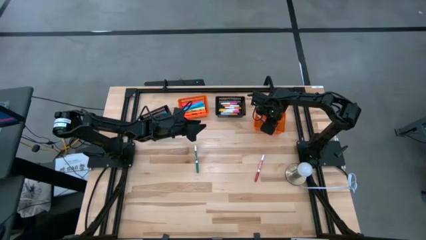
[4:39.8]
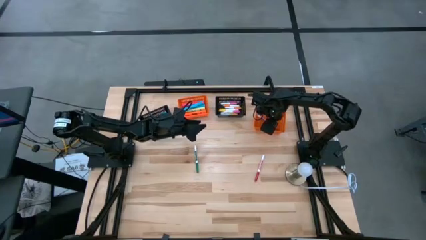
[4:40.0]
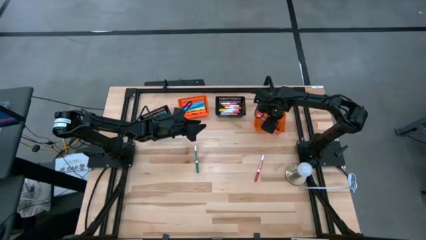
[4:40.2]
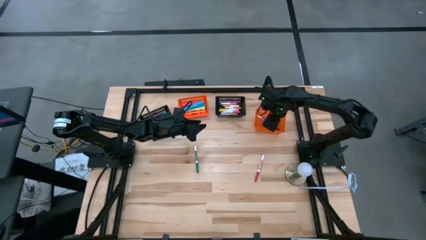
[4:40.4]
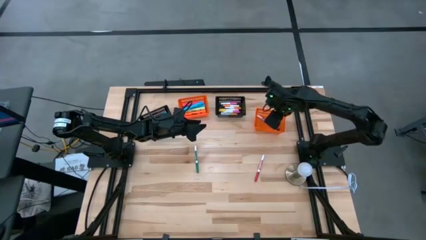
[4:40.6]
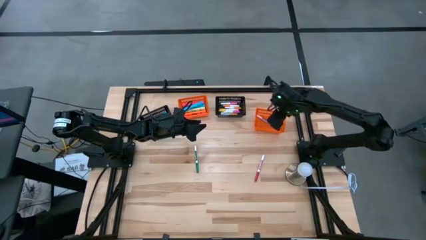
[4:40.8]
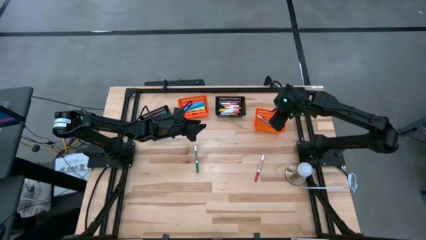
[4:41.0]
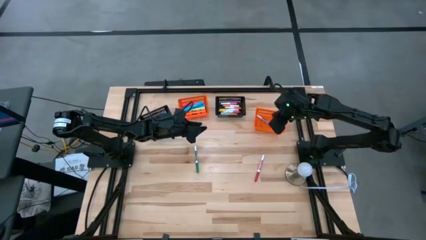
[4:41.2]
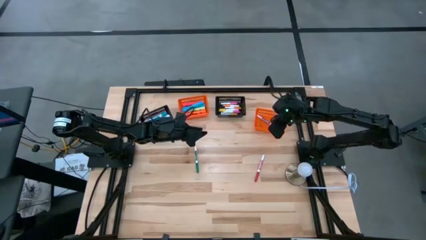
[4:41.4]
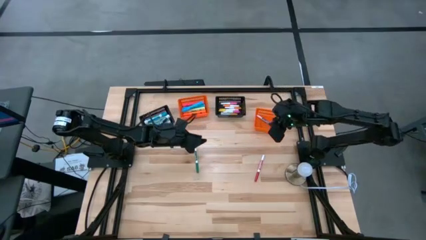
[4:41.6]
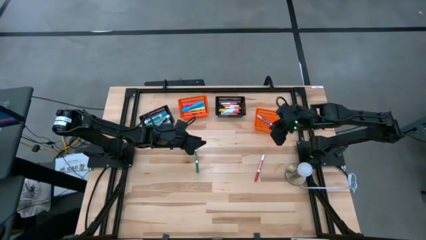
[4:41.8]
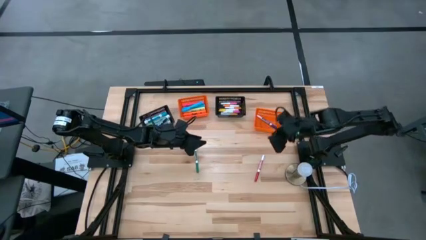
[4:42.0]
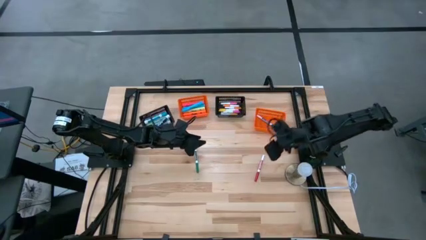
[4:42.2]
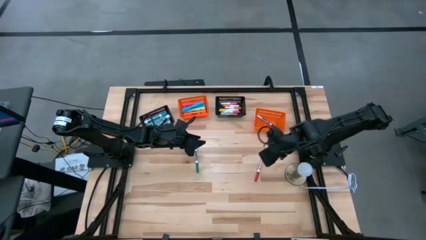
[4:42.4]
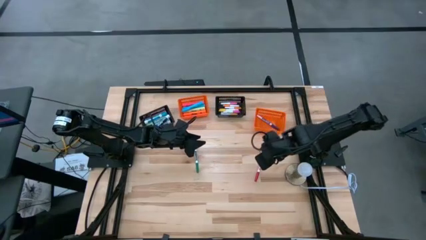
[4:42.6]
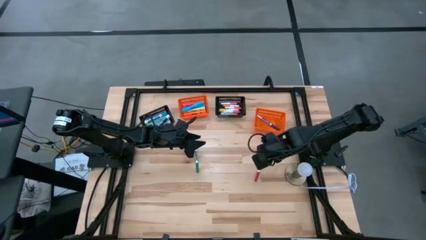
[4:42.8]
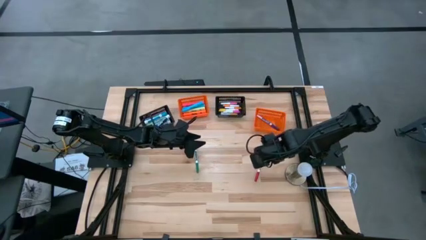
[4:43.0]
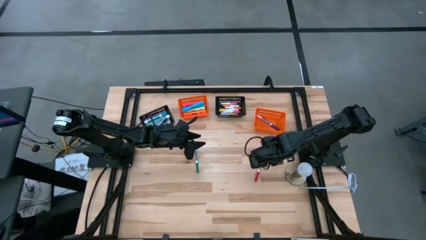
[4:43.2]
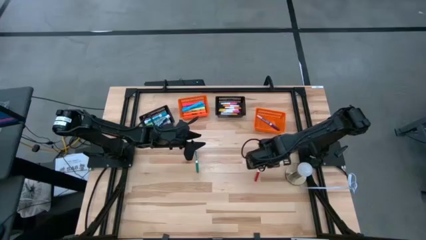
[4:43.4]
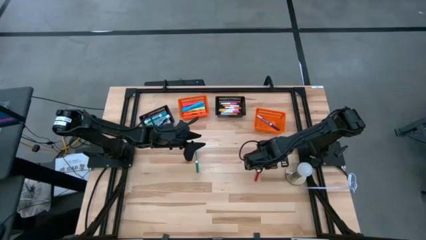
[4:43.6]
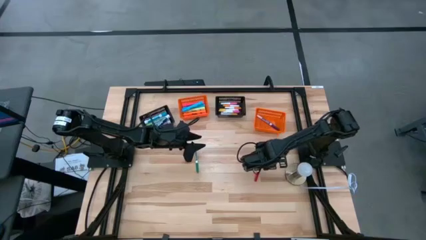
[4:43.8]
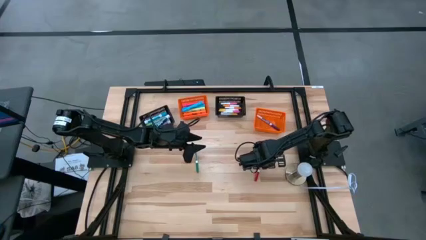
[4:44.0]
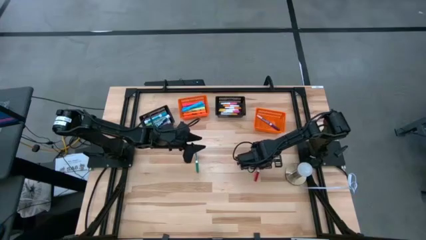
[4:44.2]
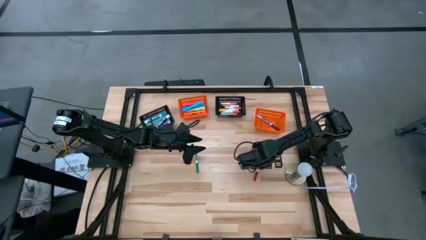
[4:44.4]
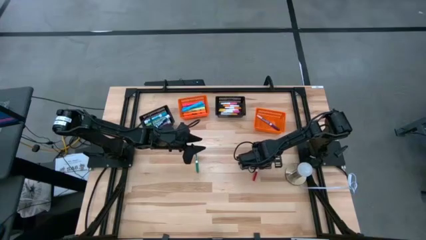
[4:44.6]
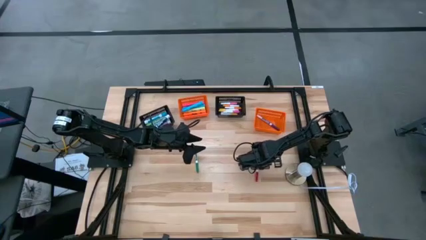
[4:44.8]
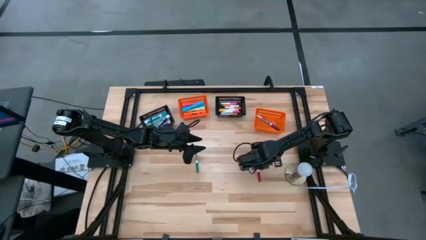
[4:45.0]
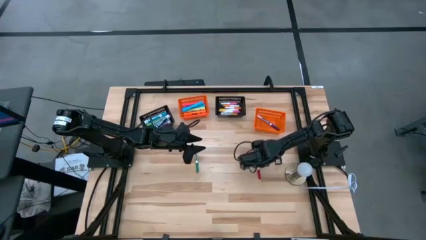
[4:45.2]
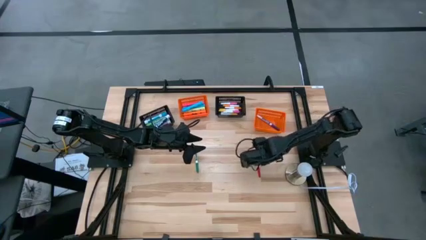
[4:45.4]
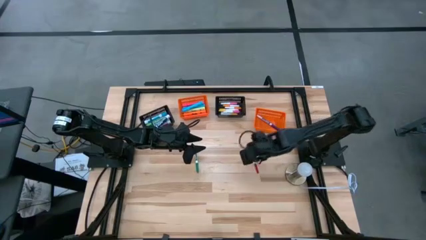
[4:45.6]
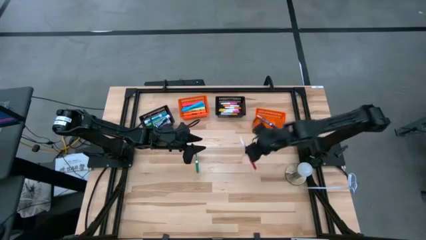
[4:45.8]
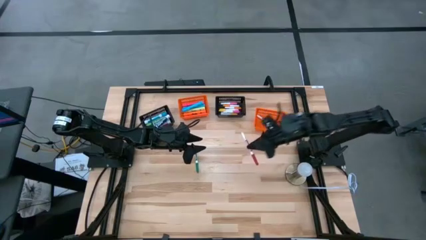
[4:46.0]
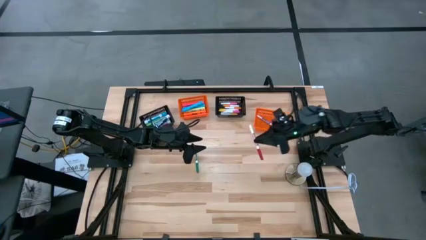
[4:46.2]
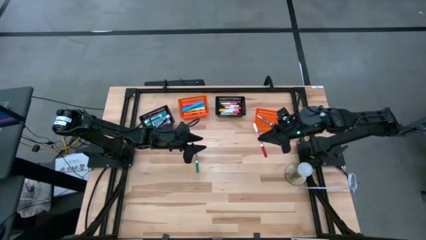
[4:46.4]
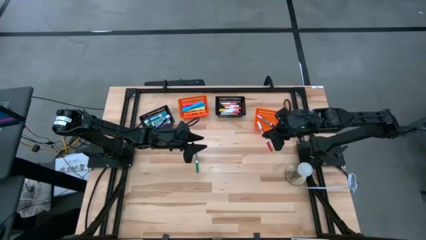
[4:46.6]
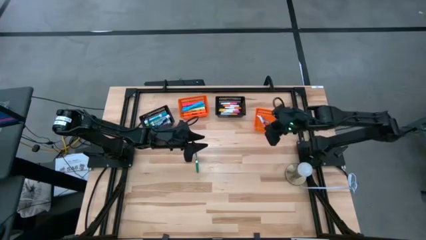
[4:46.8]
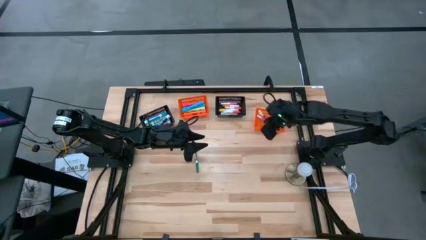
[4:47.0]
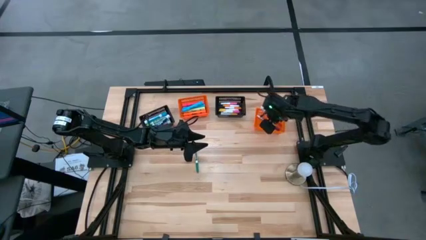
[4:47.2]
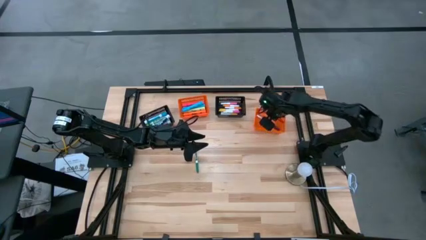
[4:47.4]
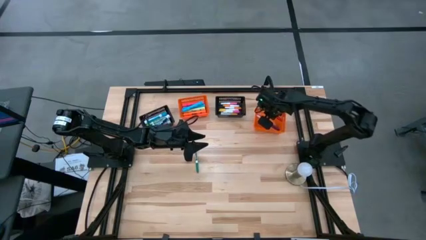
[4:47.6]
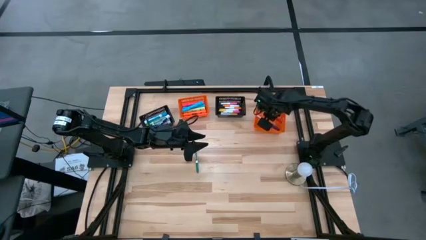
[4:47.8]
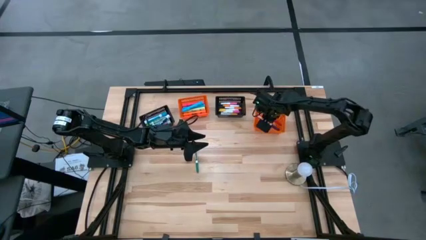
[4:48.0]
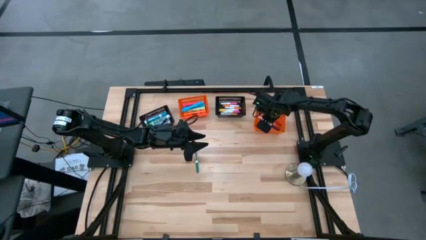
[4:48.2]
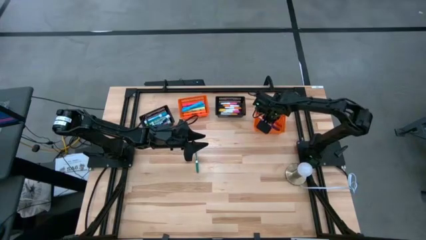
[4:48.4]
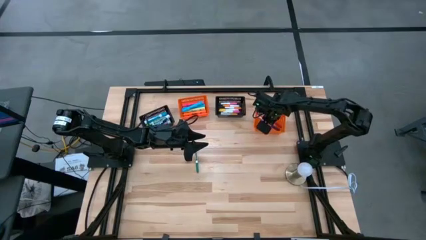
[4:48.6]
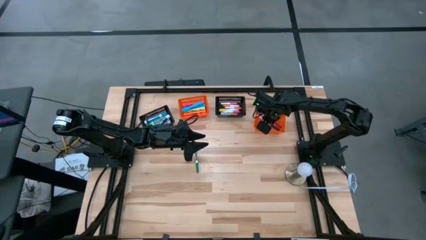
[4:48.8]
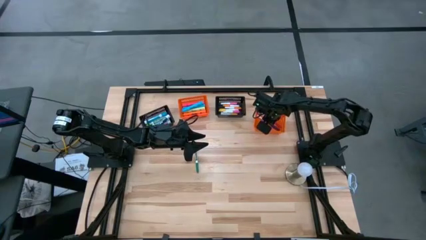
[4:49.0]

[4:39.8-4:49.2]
Task: Pick & Place Markers
Put the small red marker pen into the right orange bin

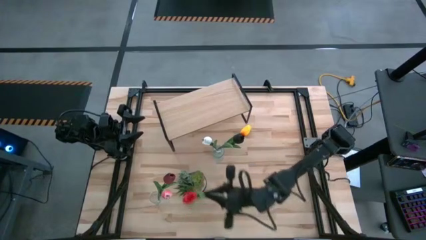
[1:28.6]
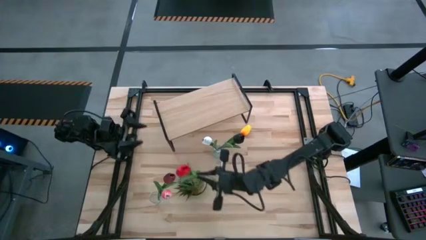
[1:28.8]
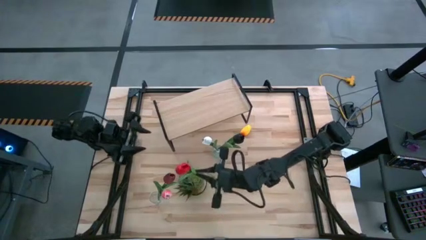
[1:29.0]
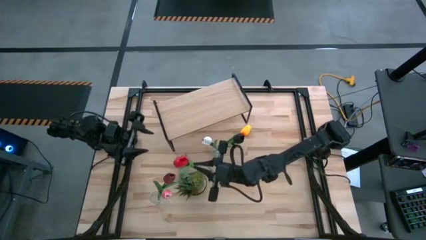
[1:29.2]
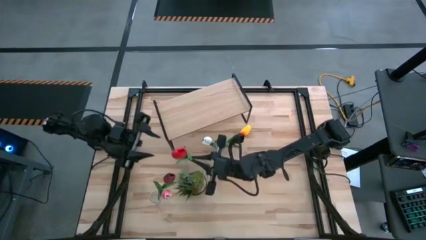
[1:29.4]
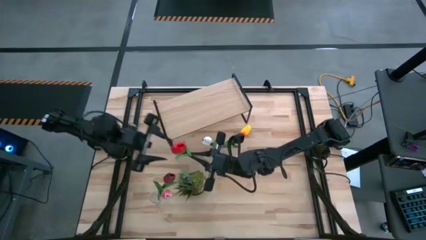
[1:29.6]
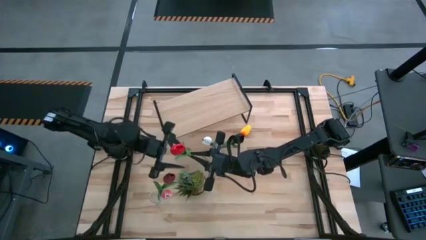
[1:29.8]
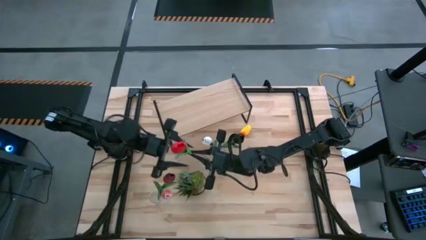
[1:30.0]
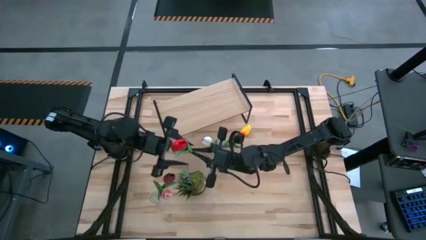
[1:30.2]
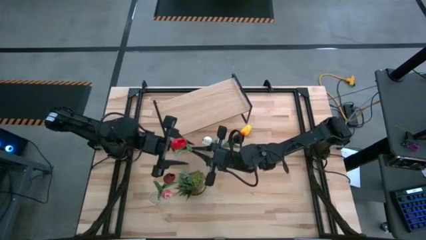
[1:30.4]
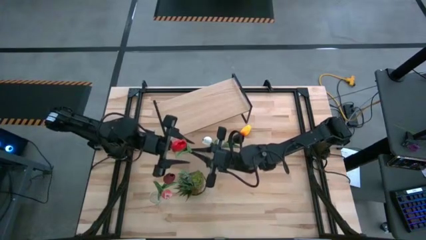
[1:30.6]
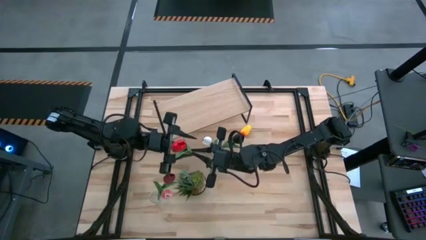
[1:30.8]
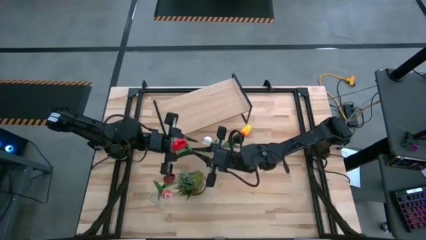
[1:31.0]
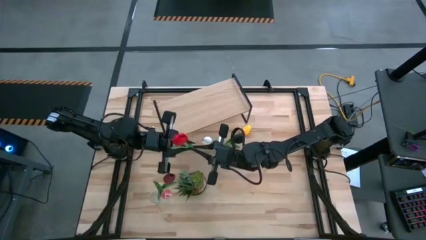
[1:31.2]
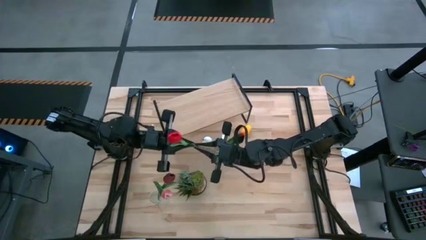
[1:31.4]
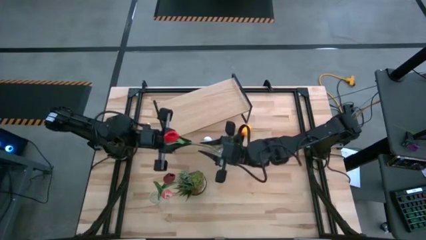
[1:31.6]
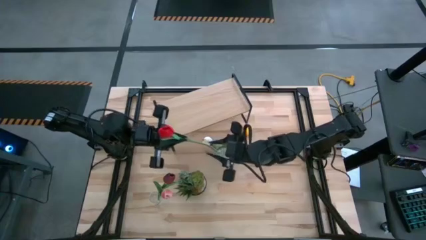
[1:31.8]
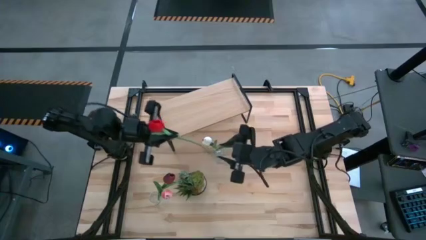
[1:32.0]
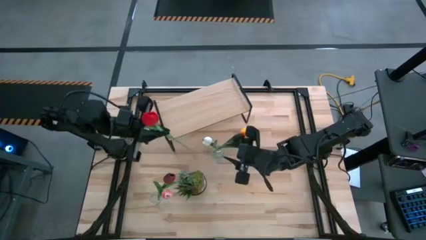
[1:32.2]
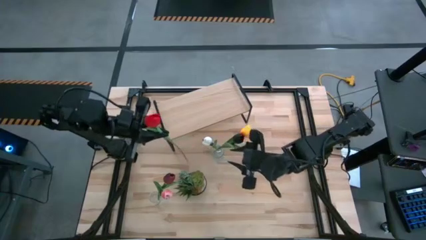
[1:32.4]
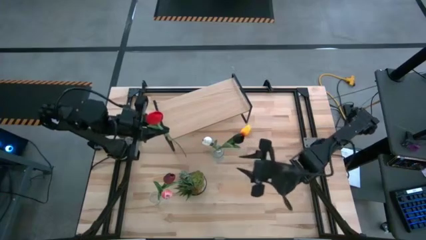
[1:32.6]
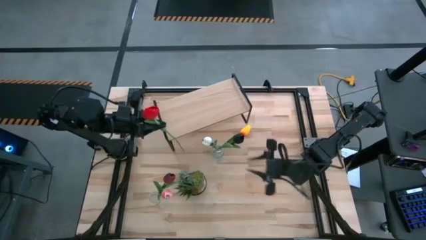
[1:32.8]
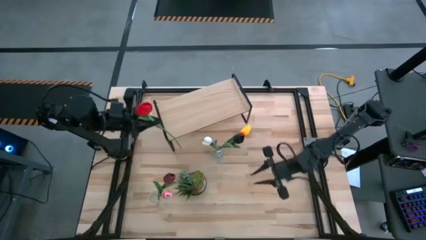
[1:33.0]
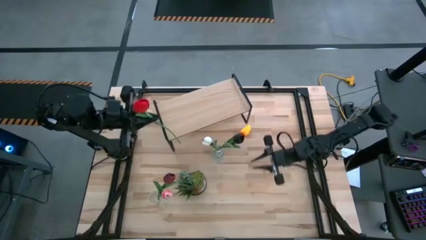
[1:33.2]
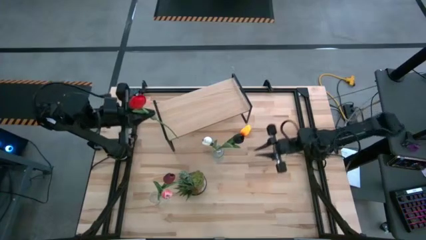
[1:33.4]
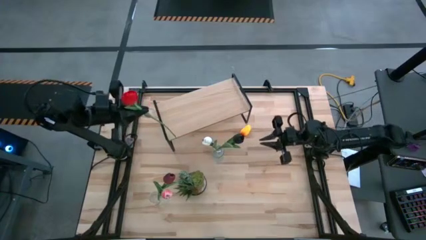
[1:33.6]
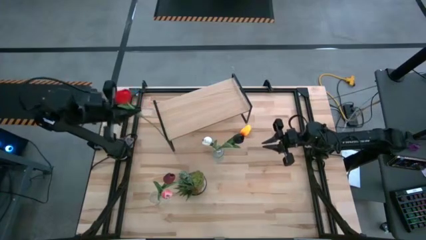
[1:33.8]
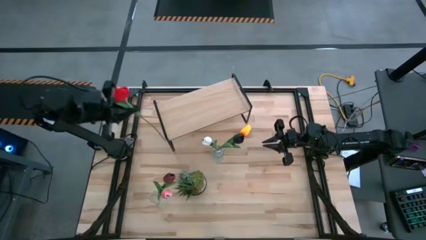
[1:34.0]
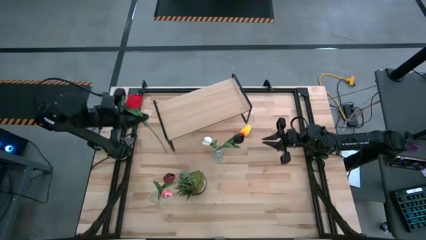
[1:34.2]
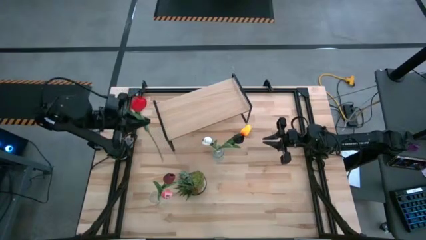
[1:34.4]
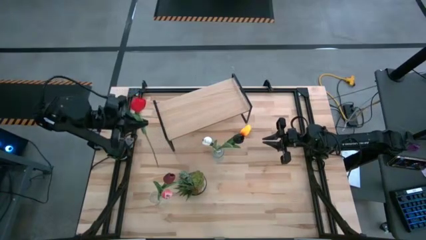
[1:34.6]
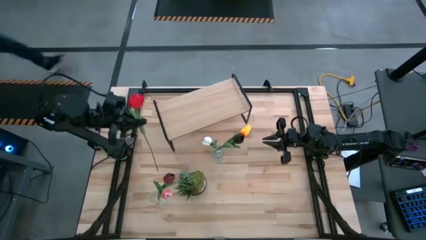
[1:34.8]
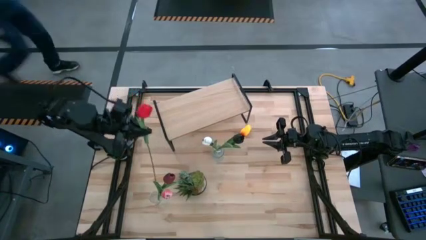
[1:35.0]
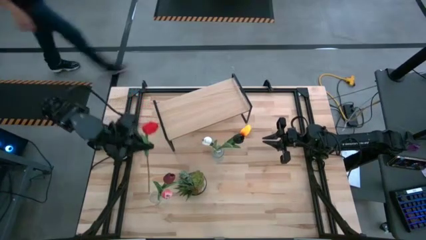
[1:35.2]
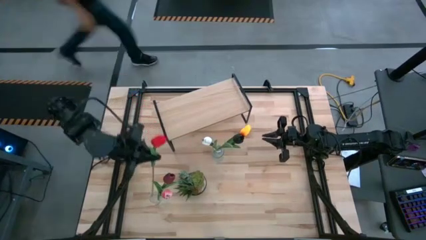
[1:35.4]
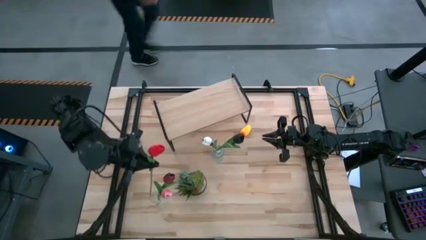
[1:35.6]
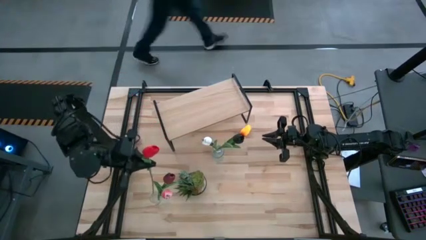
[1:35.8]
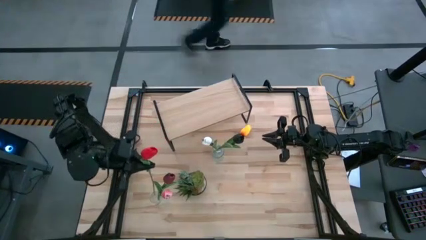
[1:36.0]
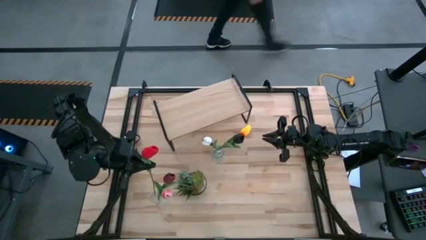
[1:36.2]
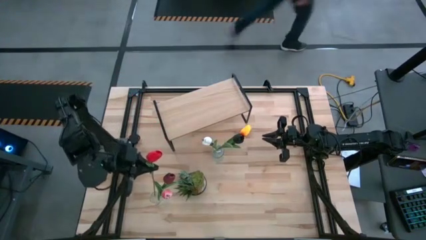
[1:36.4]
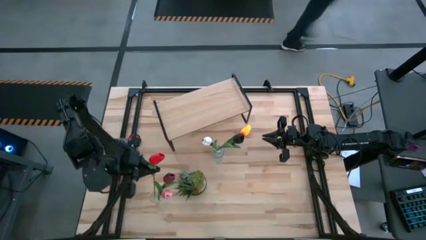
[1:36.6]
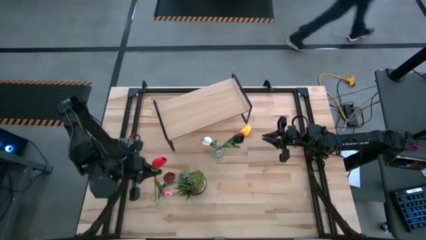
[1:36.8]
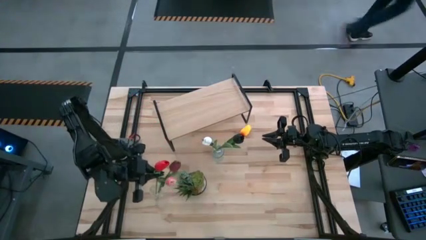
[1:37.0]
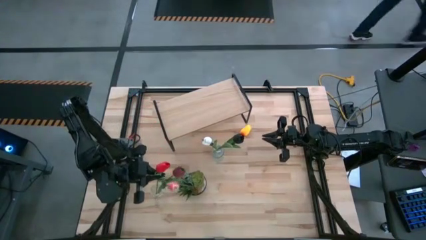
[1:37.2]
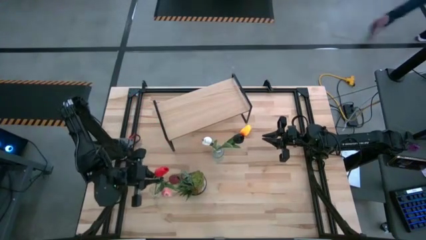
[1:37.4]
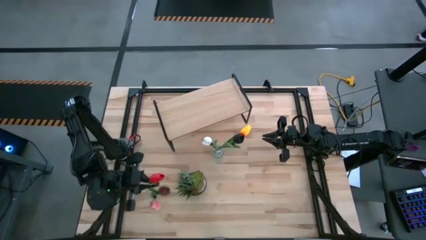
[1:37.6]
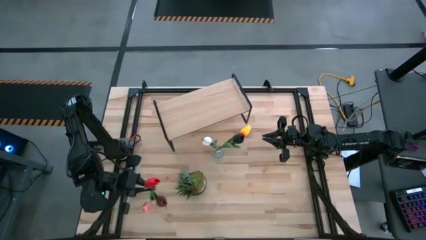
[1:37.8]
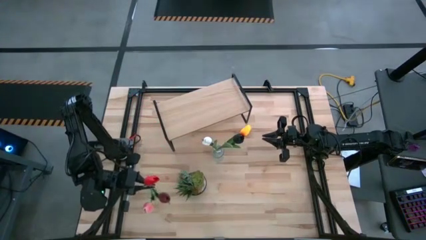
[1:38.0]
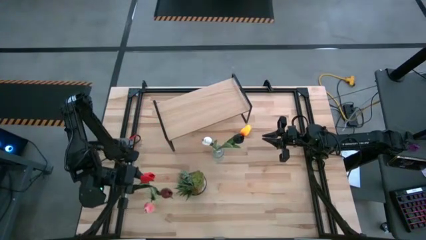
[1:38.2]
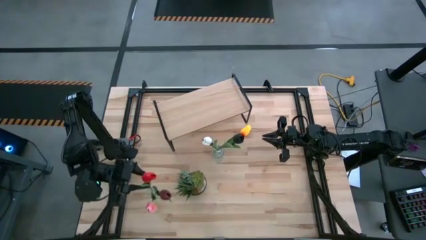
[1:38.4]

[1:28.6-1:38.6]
Task: Pick and place flowers into a vace then onto a shelf
Put the middle red tulip into the bottom transparent vase
